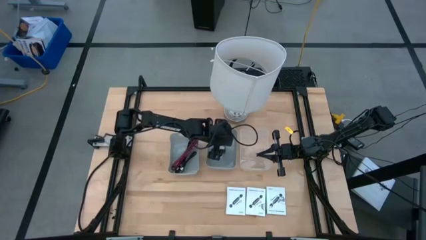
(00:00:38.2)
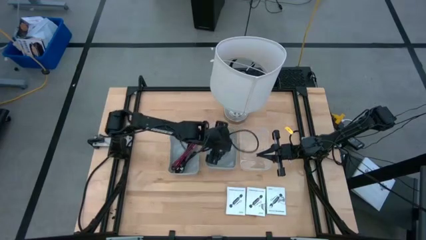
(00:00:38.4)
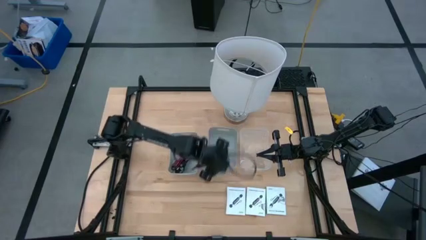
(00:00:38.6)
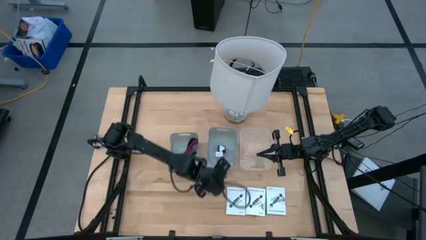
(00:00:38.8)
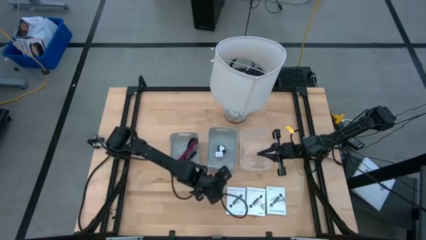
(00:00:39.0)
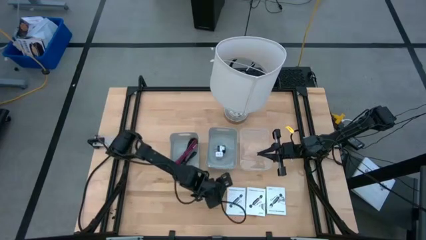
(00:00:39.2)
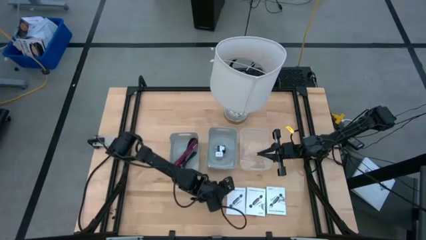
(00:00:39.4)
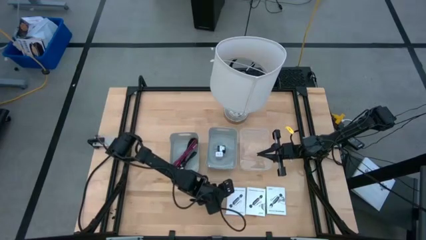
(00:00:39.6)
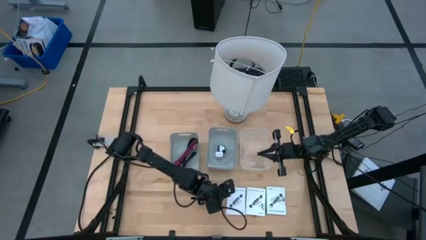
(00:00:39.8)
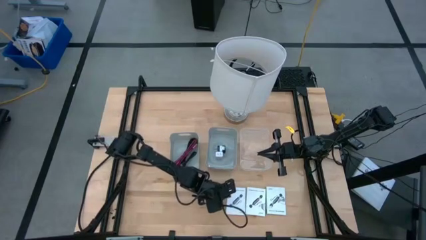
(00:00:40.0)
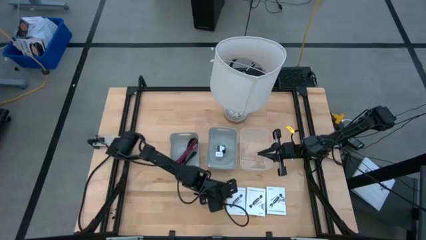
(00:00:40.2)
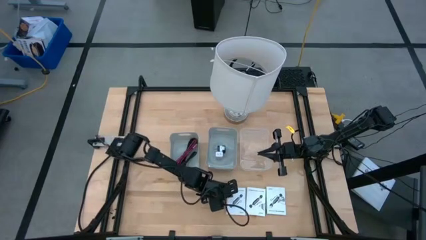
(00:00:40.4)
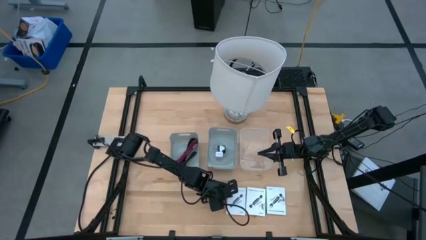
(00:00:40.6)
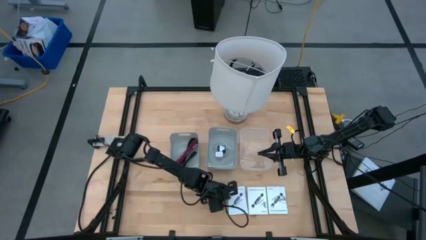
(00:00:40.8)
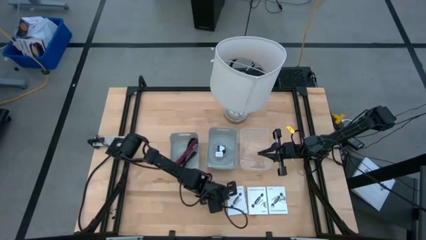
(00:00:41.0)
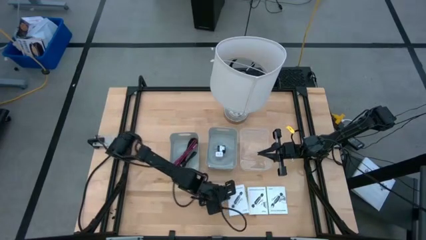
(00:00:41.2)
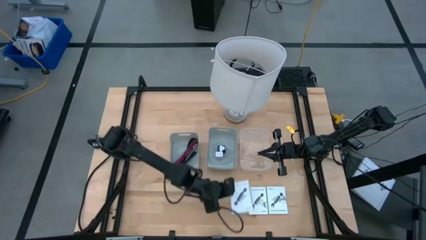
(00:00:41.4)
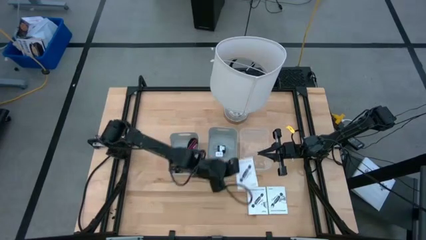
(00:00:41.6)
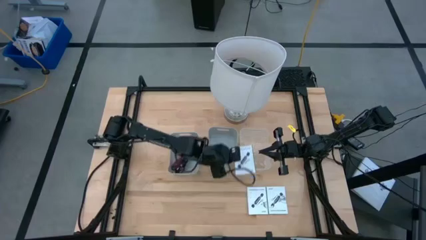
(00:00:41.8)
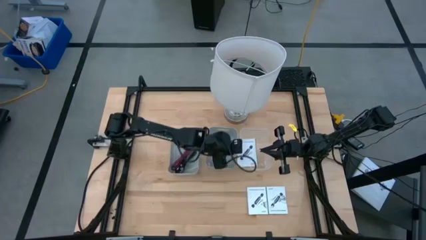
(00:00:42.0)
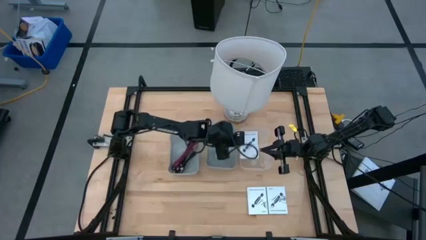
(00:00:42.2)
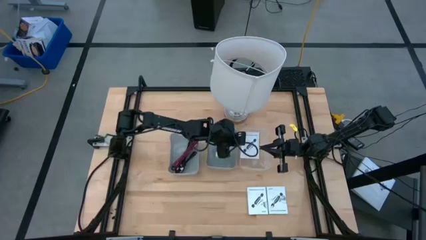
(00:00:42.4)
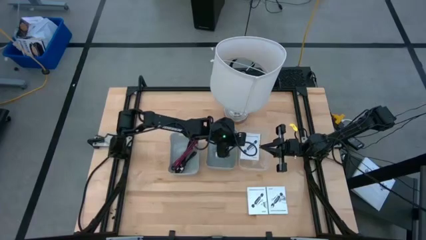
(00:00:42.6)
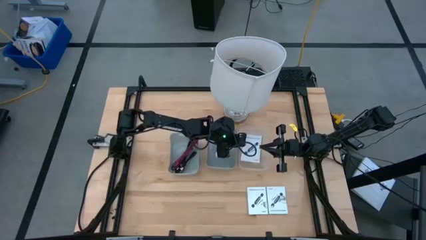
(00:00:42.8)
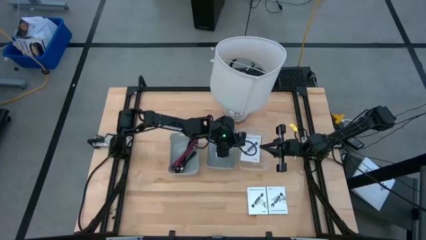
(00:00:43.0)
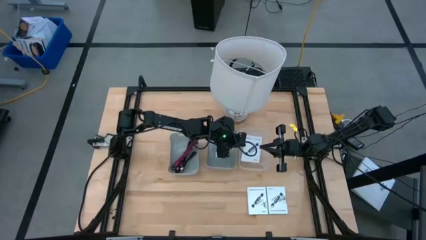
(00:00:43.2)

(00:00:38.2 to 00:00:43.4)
Task: Pick and place items into bin
Put the left card reader box into the transparent bin

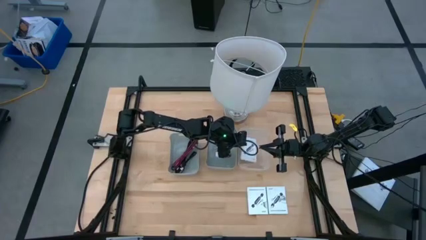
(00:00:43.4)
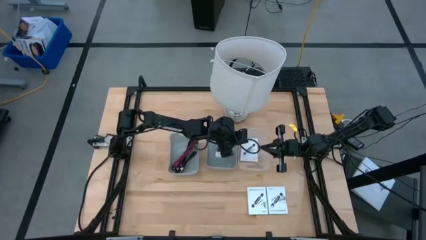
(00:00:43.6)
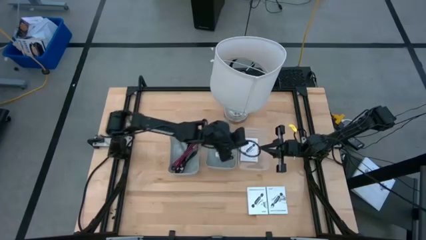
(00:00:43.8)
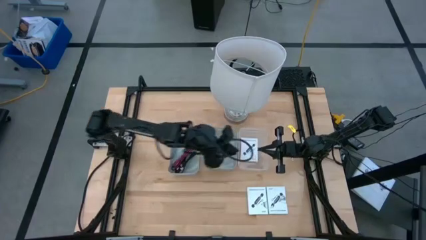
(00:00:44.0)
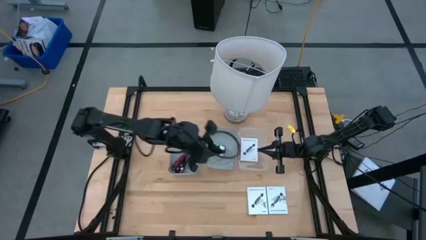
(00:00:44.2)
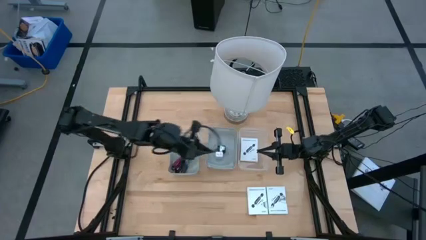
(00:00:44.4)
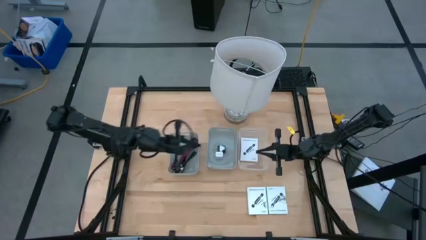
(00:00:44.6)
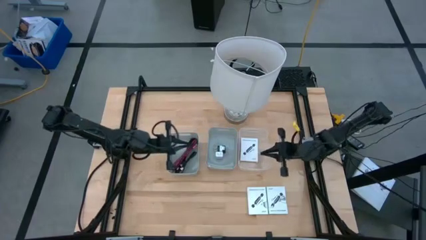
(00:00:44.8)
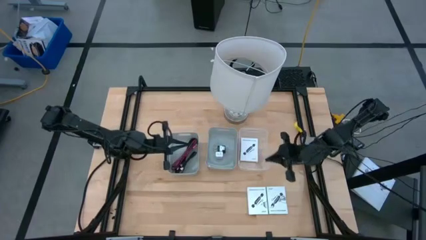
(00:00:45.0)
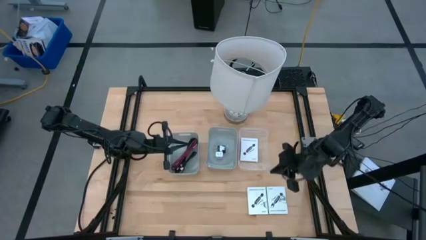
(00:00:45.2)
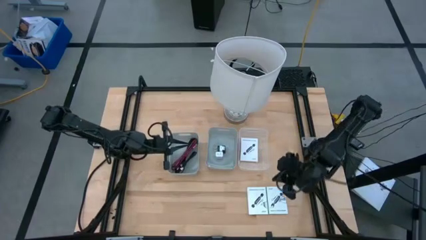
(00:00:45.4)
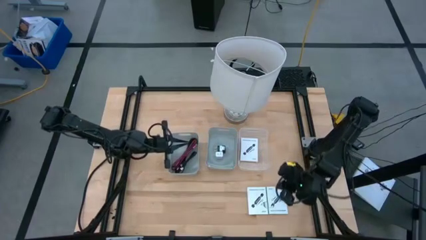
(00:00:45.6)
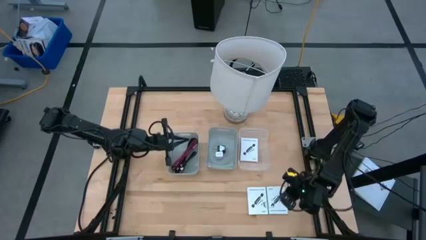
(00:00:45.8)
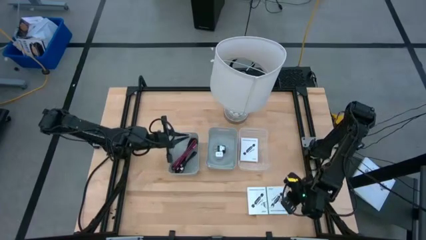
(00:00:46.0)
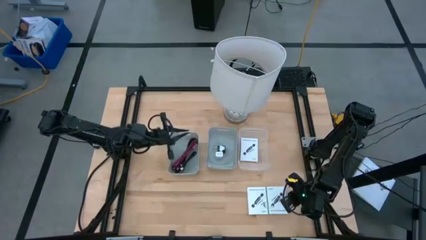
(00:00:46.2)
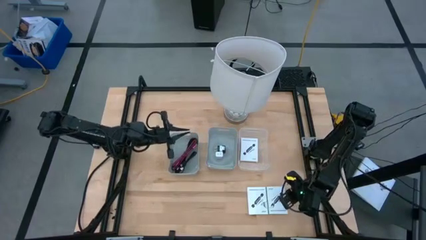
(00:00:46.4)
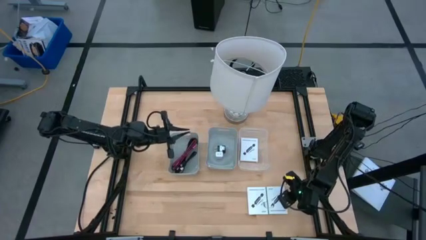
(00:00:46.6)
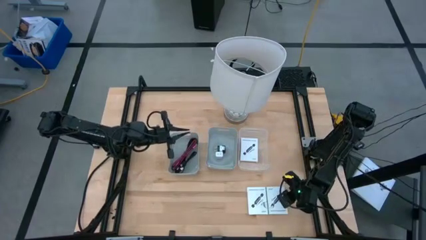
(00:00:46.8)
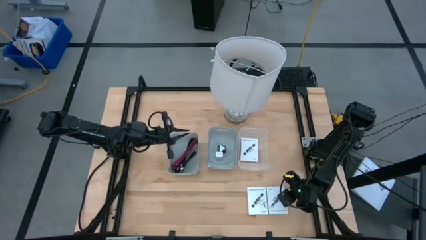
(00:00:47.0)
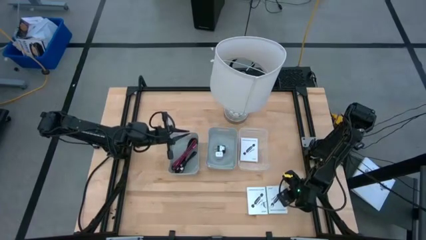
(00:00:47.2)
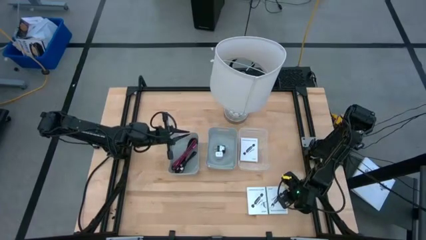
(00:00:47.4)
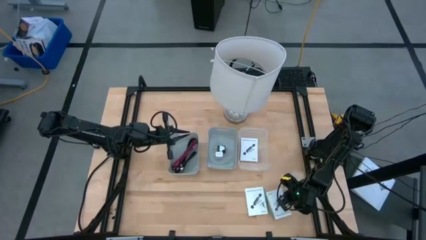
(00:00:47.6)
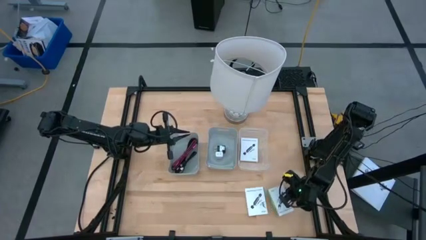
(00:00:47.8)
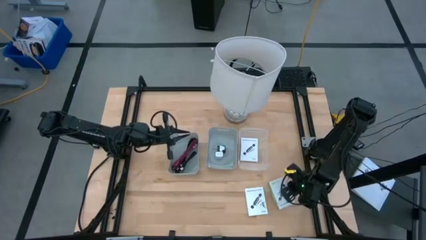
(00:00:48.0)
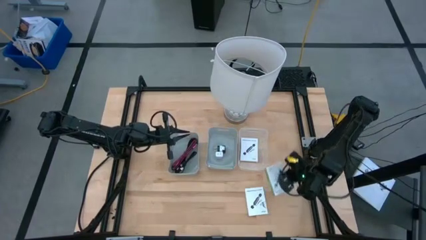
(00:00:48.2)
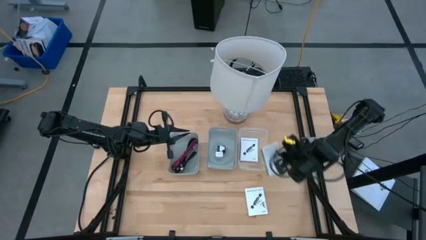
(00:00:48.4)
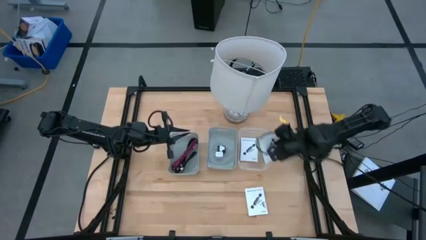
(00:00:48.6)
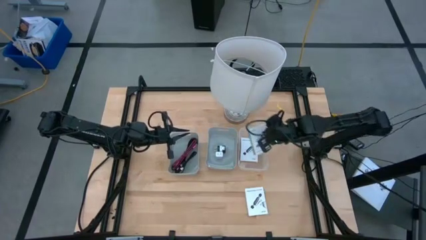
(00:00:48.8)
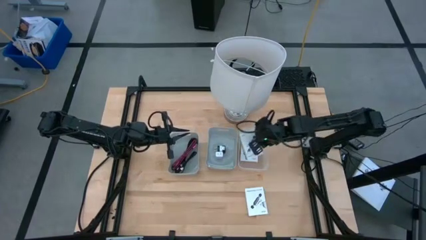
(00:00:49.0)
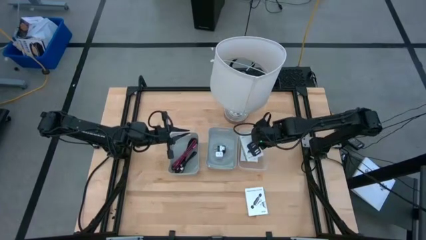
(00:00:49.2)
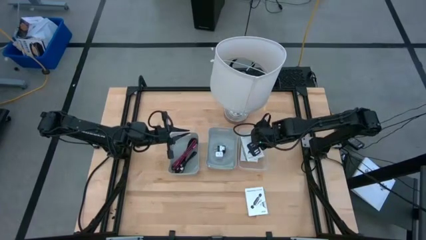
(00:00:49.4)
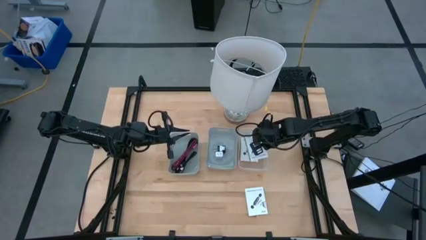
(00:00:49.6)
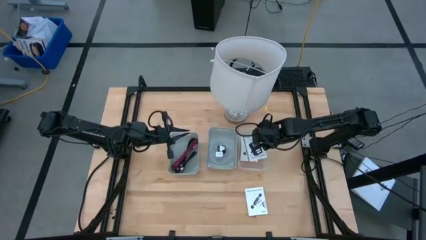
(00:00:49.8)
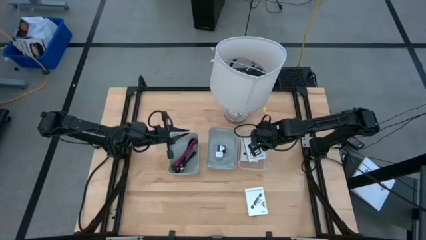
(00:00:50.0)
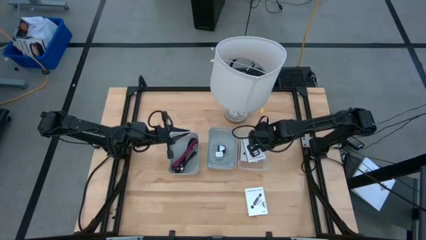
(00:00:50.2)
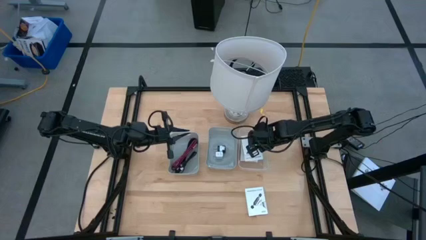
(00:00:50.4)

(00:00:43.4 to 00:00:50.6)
Put the right card reader box into the transparent bin

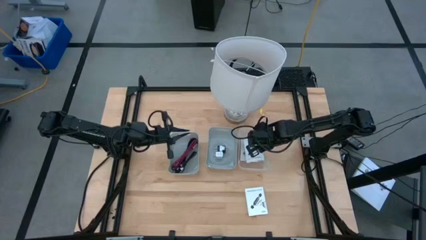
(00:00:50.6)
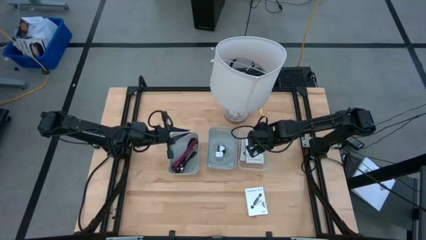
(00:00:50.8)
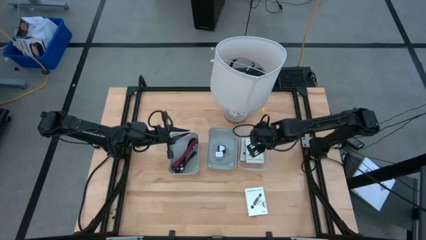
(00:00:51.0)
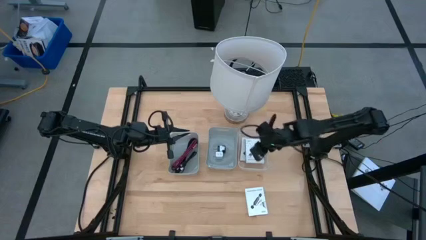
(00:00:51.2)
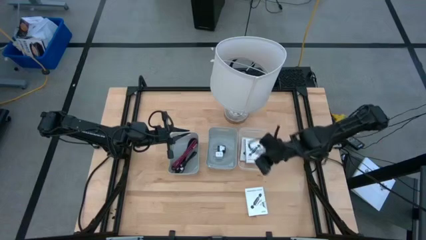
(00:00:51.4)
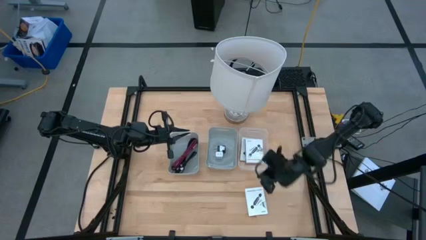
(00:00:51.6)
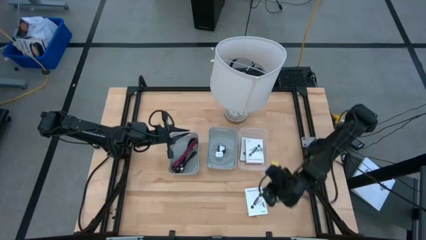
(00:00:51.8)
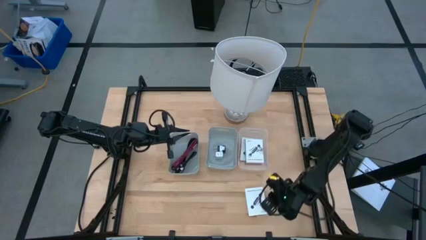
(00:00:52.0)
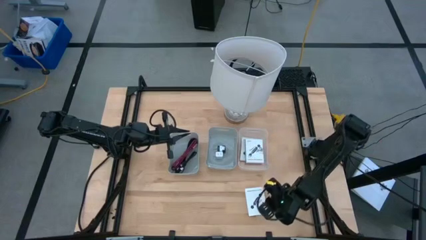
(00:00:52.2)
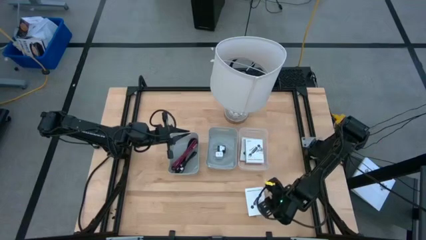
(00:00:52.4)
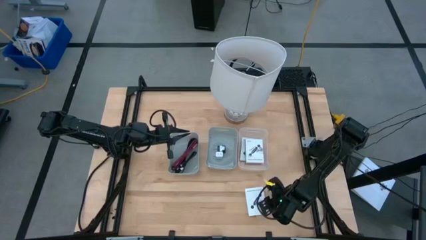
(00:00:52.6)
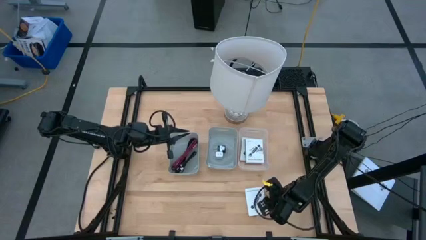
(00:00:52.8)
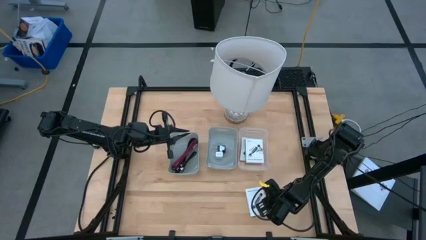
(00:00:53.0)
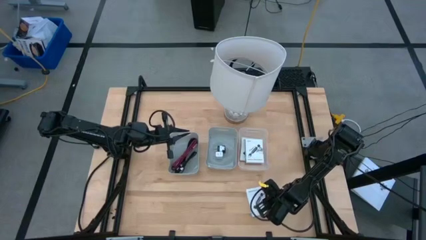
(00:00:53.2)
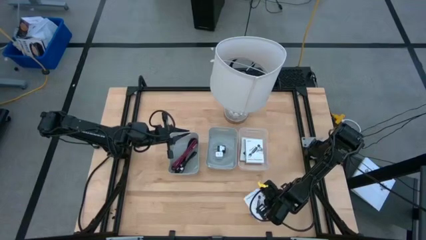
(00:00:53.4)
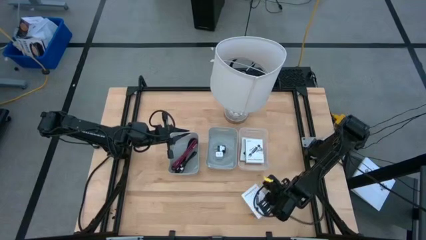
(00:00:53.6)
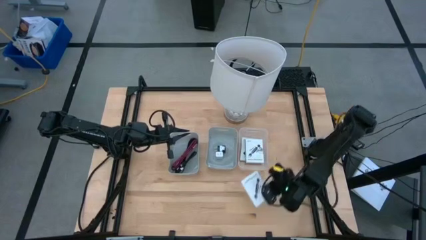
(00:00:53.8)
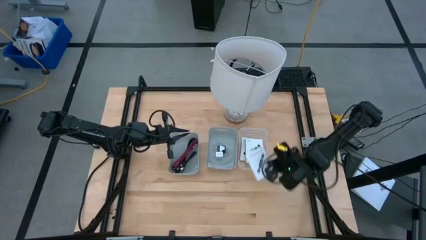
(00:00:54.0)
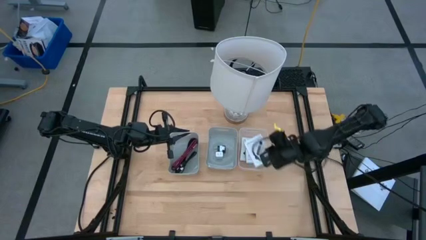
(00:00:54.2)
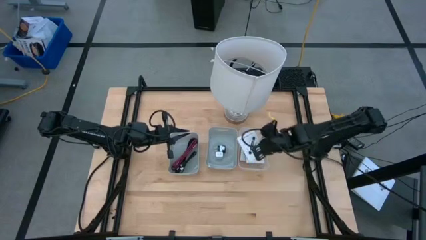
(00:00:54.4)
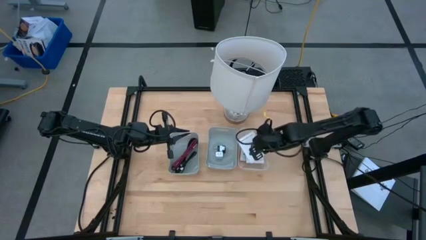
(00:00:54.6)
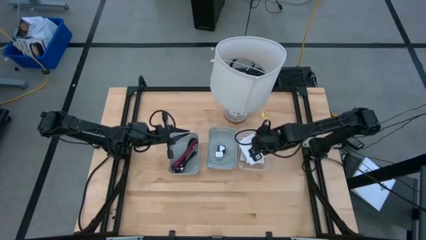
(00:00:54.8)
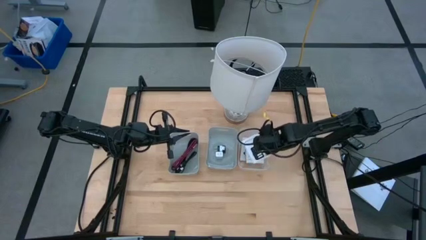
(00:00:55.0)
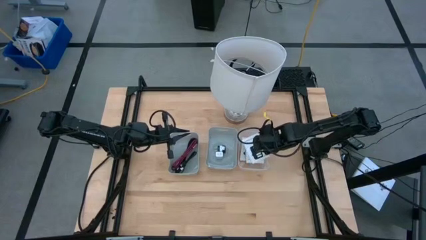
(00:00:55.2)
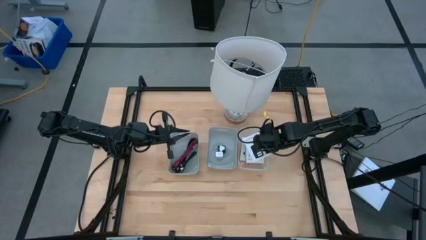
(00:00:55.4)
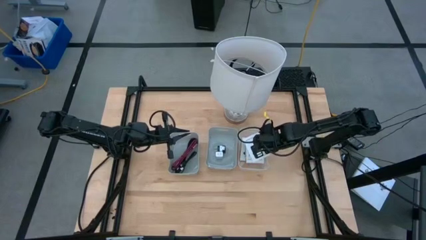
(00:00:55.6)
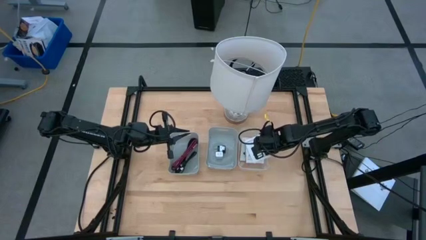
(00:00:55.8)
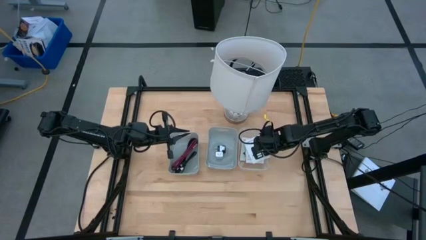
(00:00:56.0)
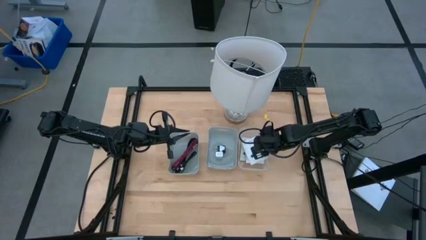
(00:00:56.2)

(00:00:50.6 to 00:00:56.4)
Put the card reader box into the transparent bin
